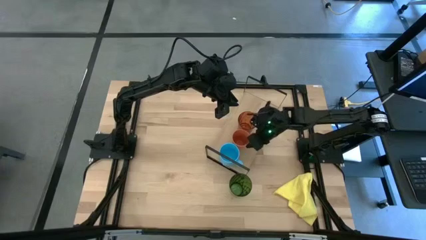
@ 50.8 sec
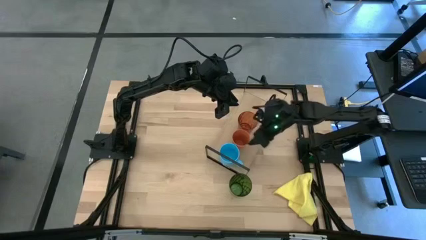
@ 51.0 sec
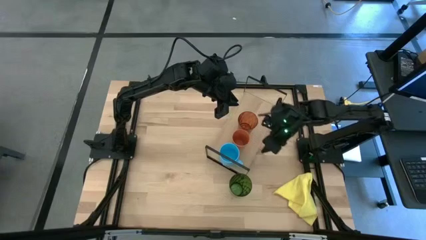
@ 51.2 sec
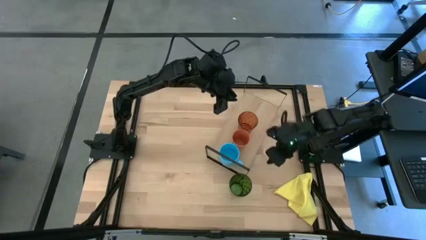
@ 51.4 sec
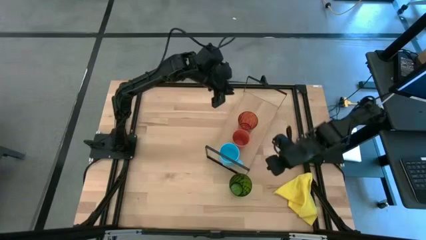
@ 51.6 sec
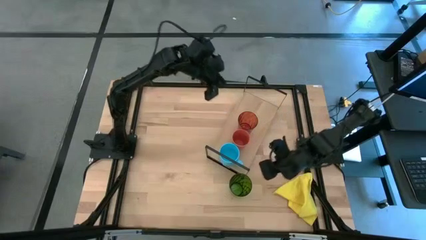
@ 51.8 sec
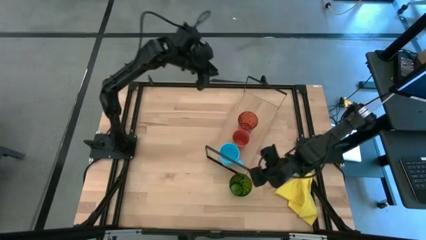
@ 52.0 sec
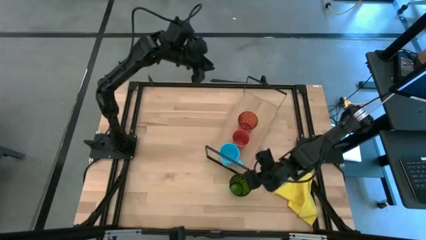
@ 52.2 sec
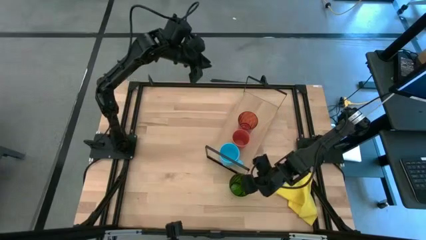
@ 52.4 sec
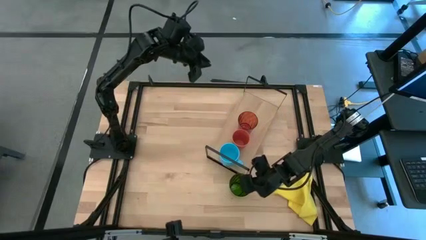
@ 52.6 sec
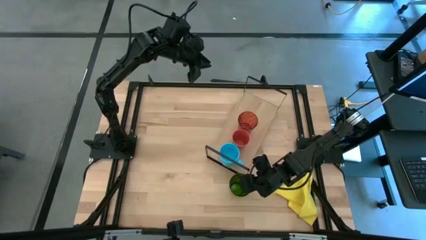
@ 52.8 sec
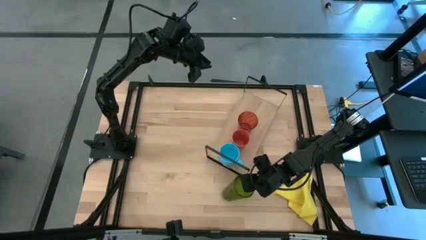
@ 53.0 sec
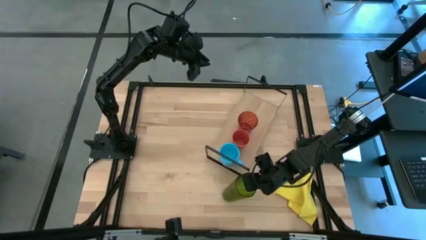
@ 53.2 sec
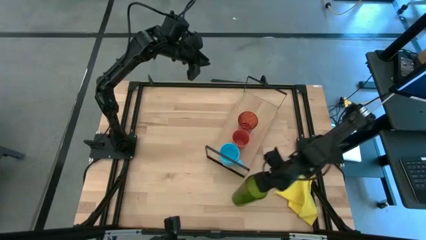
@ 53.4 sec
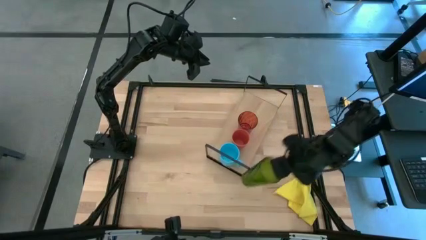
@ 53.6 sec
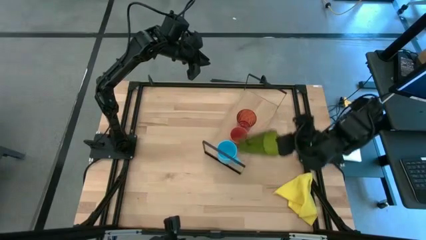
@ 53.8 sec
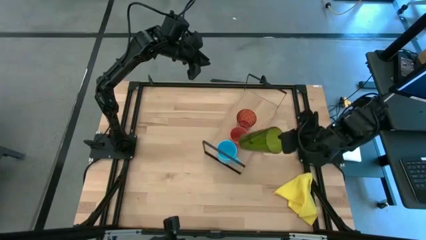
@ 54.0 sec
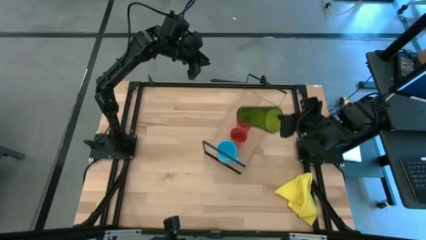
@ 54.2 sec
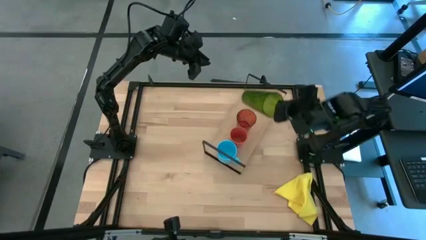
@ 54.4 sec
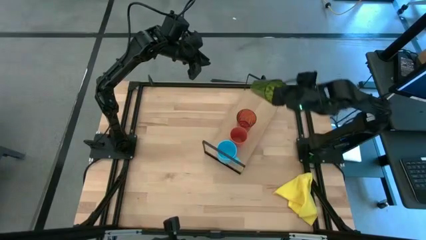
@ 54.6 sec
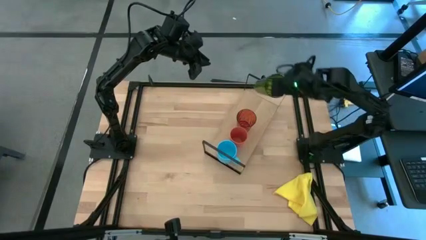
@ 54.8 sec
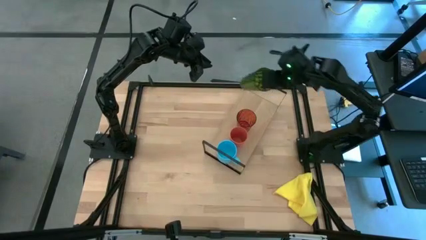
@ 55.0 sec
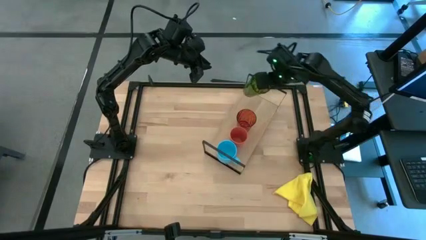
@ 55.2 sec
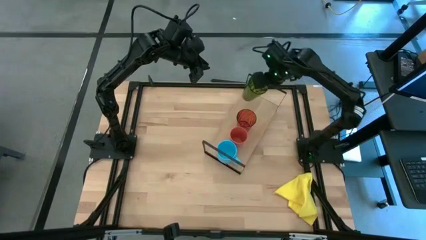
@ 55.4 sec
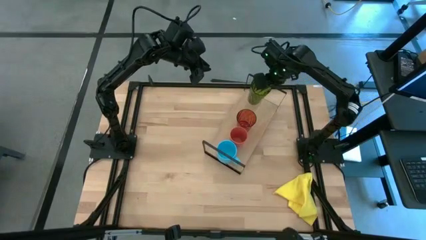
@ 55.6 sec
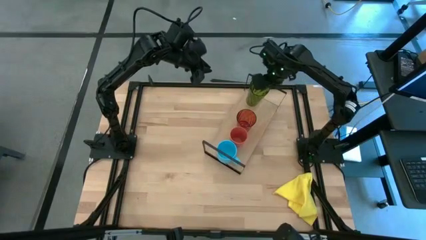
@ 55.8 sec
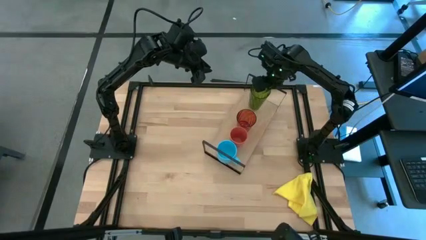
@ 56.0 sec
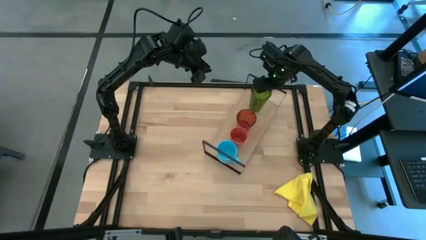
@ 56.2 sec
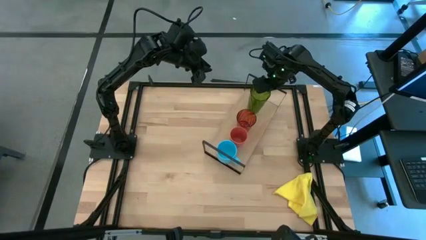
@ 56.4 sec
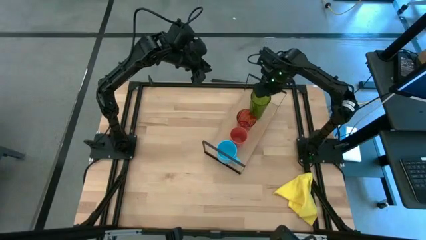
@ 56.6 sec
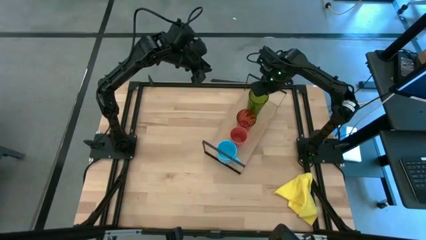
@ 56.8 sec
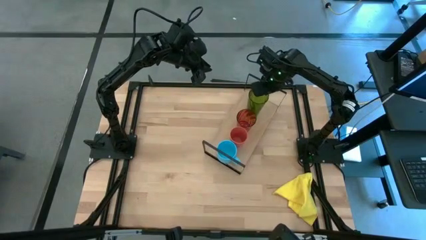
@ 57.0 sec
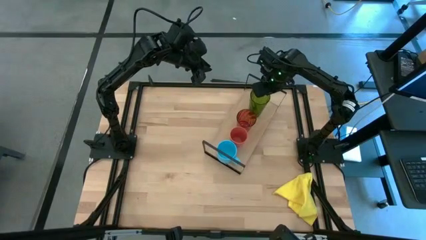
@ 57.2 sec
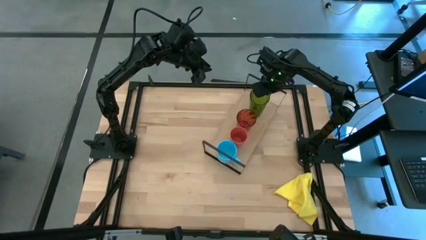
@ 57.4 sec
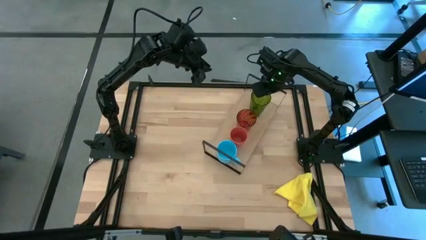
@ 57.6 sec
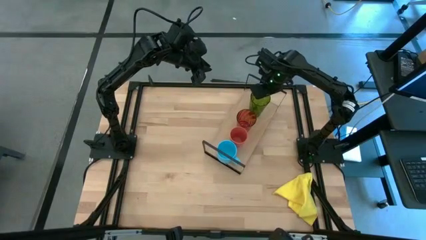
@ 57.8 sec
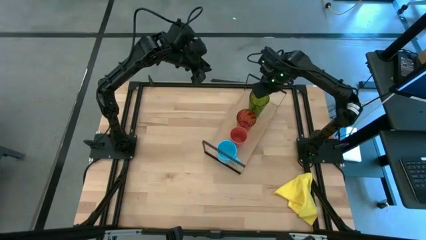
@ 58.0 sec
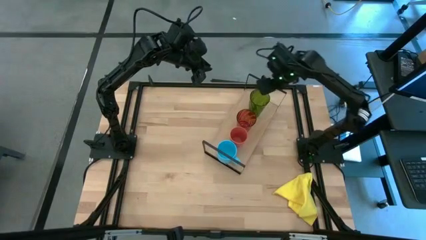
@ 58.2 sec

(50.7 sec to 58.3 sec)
Task: Stack small to large cups/mugs on shelf
Put the green cup on the shelf

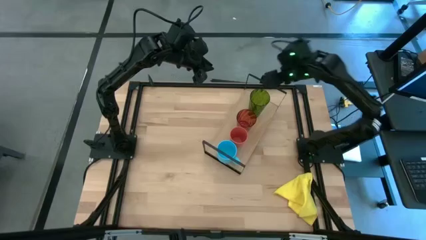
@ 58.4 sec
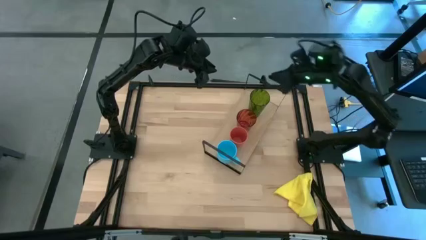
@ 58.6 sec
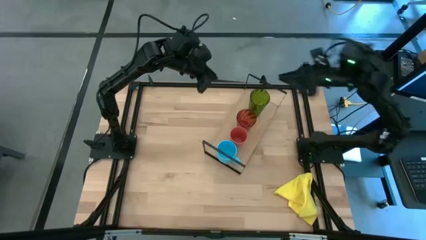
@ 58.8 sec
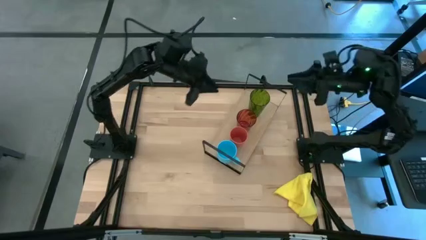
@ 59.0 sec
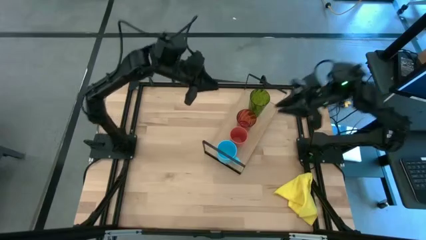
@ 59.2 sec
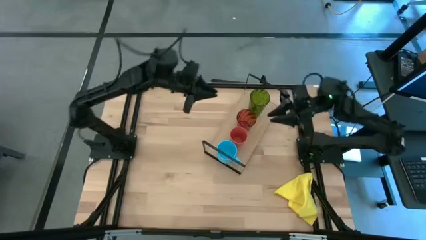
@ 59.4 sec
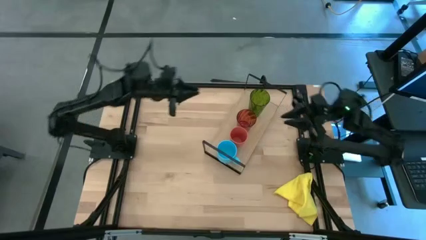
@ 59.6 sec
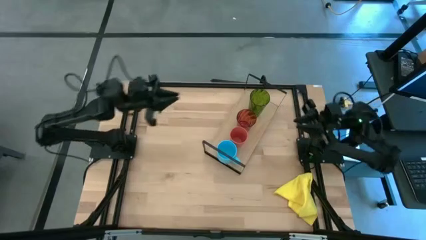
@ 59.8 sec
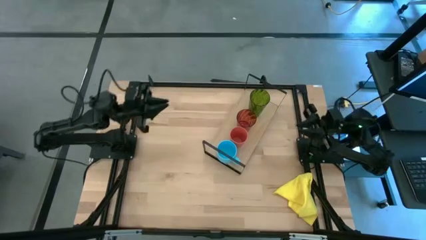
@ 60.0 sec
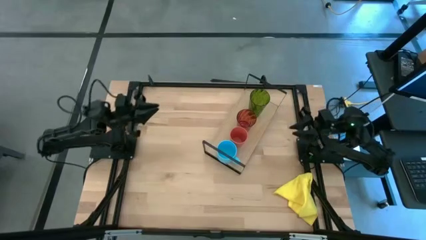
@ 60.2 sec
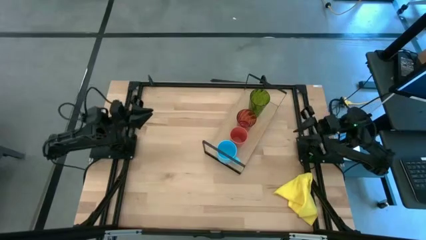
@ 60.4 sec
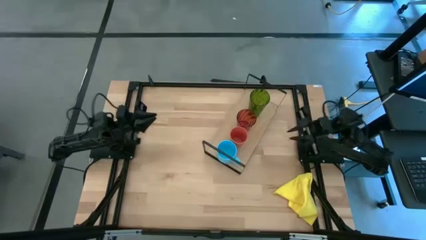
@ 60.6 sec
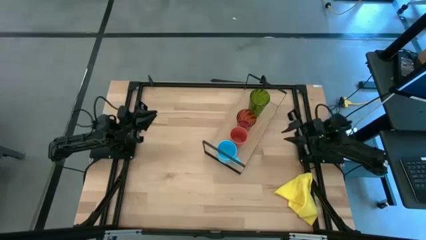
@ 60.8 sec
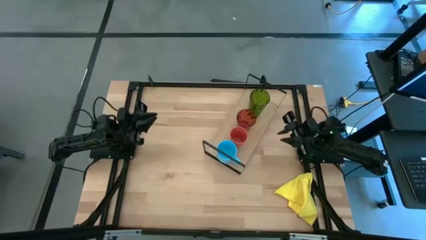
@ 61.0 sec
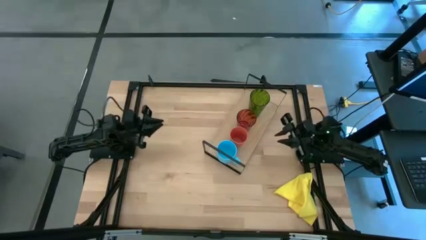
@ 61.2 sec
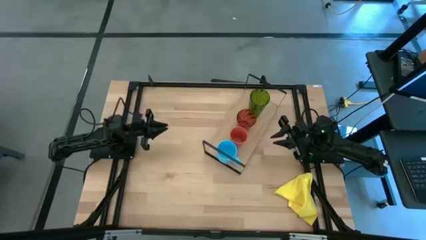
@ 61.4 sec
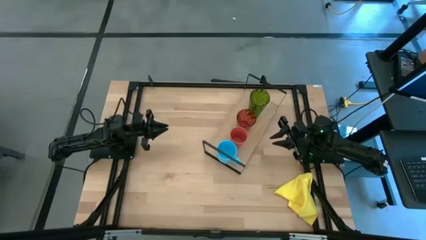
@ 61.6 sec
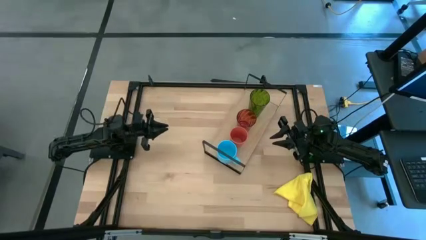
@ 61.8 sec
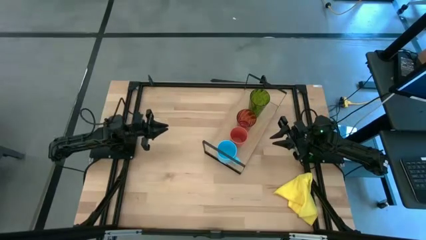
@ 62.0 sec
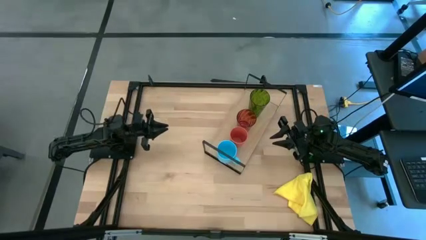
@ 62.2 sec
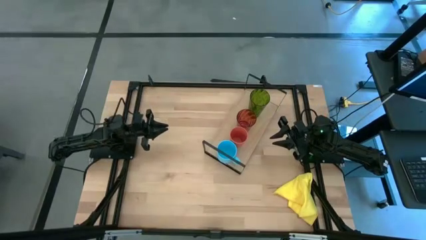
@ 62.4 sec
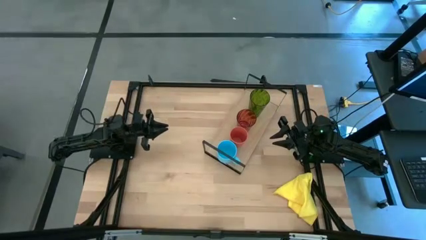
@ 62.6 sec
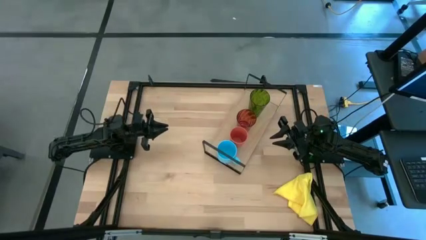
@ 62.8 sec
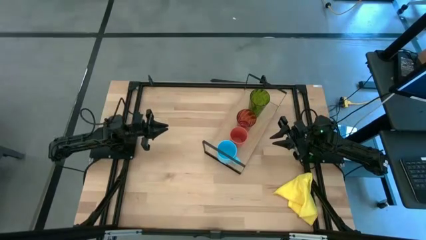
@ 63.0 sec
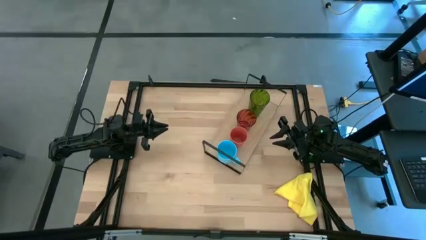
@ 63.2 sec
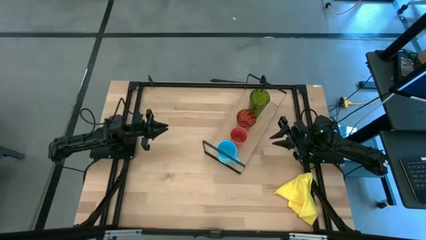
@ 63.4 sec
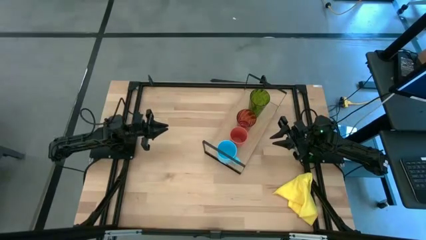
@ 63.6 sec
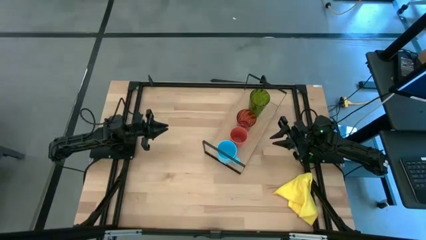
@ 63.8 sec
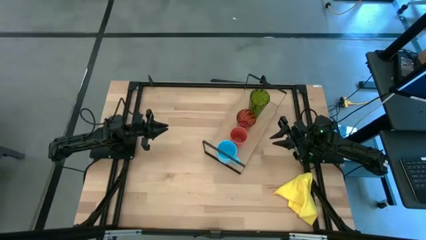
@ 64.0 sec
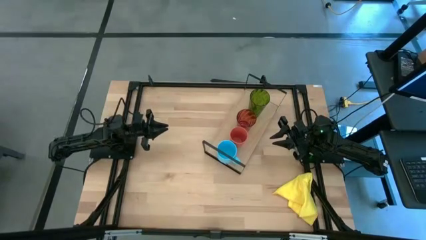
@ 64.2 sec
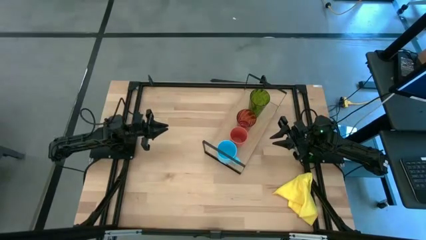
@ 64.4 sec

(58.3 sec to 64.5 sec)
Return to Home Position
